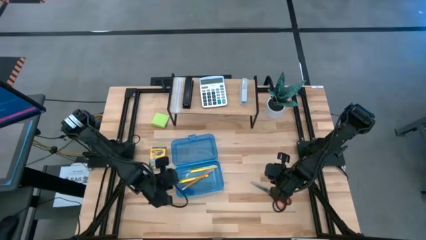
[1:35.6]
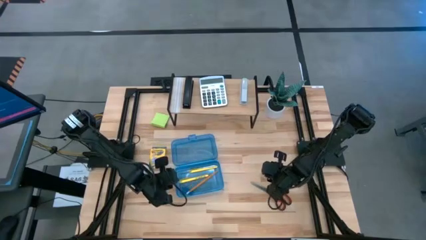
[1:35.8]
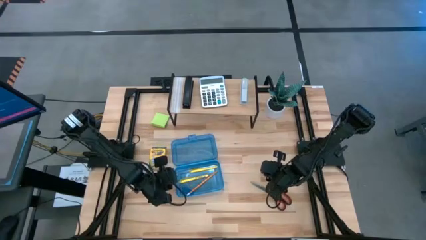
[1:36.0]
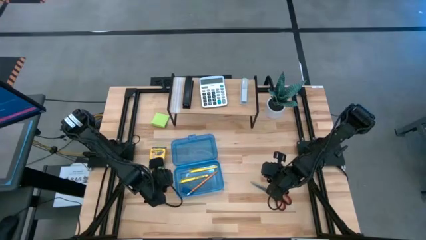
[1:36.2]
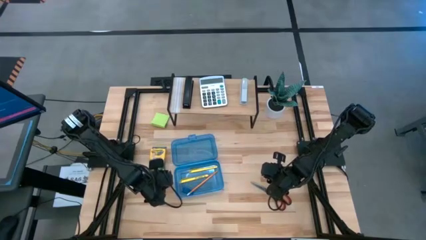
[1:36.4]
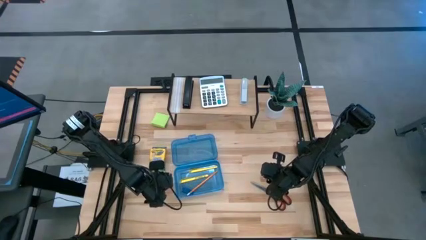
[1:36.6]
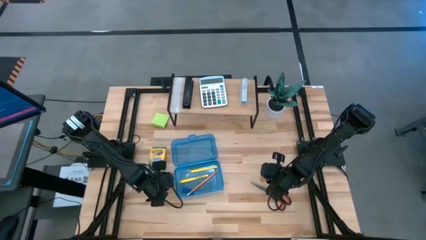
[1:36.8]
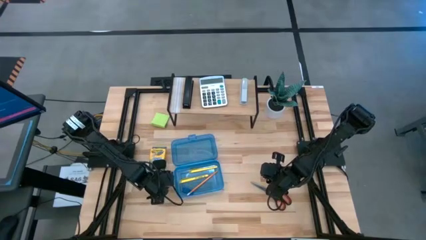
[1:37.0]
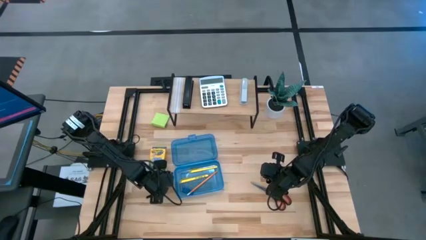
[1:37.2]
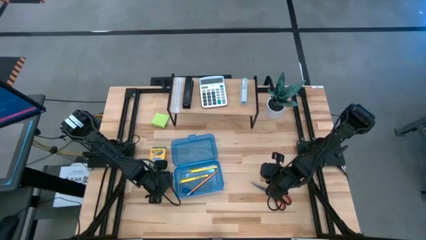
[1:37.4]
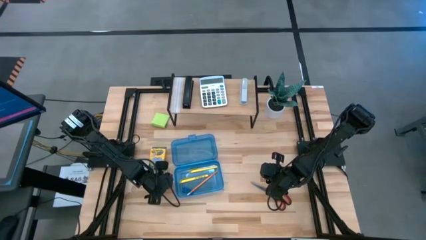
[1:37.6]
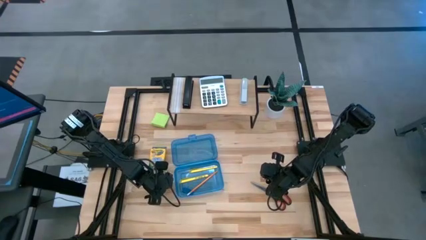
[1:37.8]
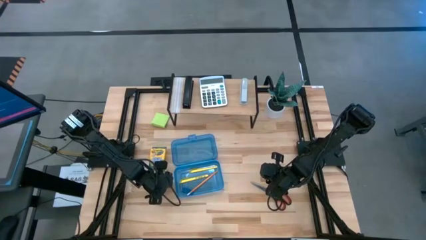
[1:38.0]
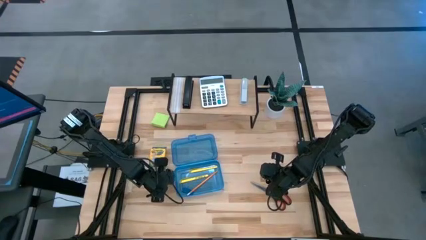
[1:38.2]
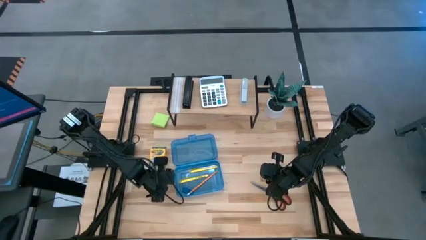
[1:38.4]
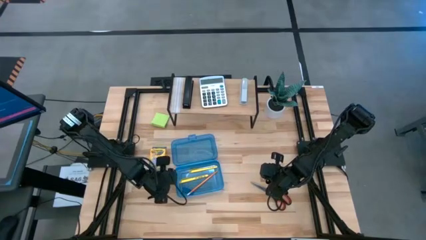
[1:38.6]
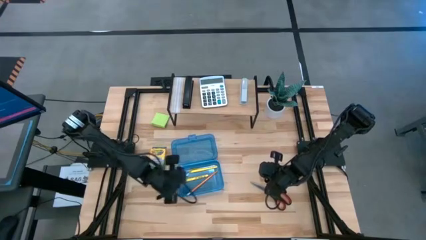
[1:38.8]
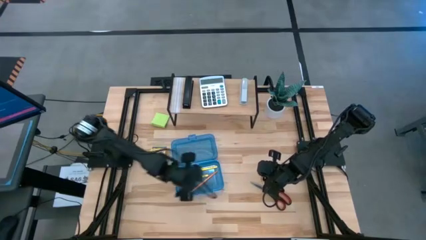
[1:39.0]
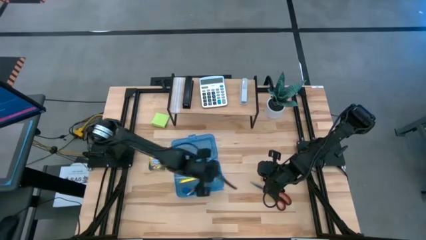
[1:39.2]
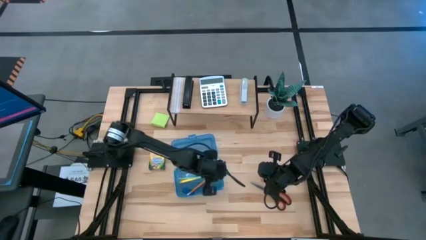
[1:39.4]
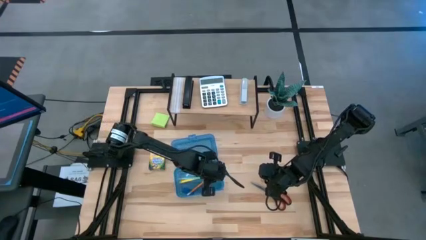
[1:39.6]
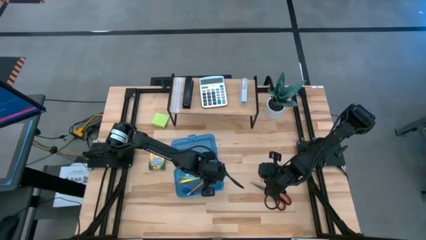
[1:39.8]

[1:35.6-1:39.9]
Task: Pack school essentials
Put the green pencil into the blue supply box

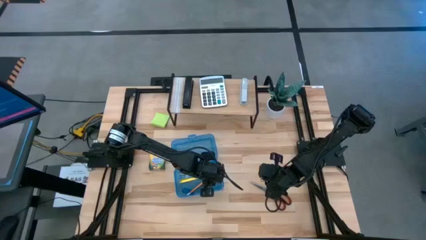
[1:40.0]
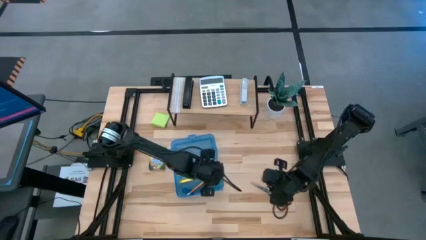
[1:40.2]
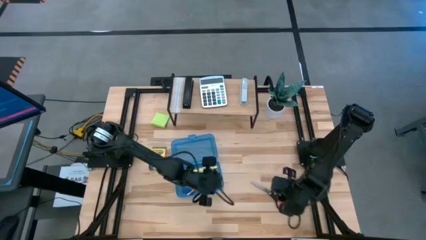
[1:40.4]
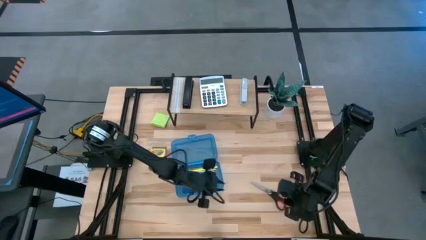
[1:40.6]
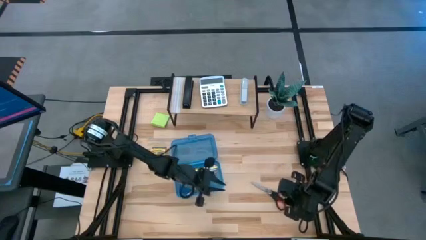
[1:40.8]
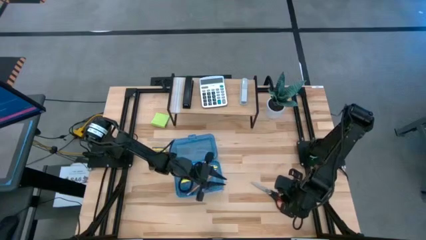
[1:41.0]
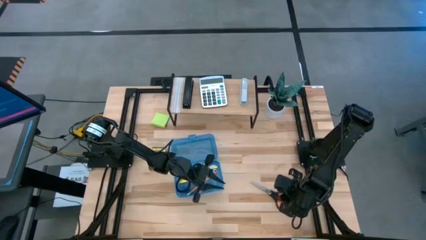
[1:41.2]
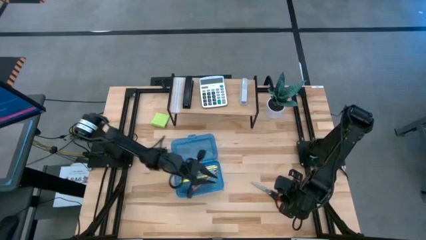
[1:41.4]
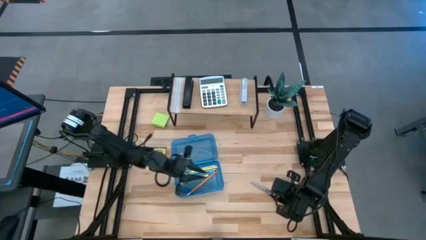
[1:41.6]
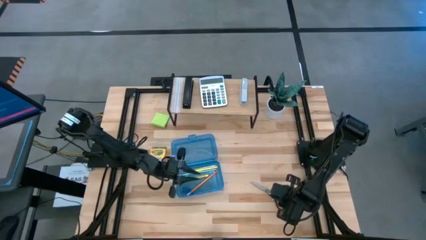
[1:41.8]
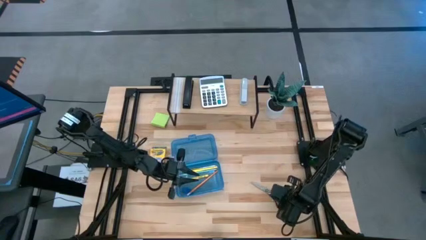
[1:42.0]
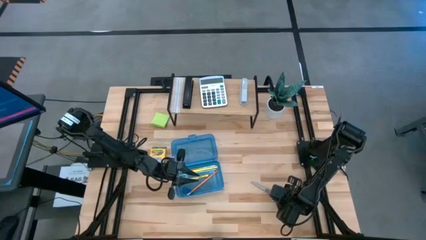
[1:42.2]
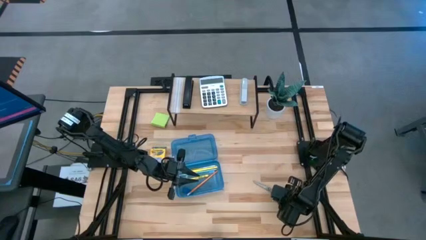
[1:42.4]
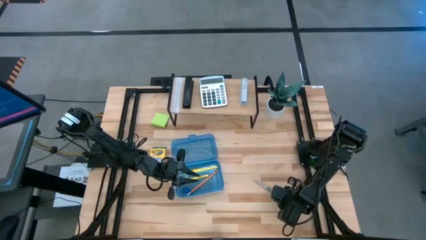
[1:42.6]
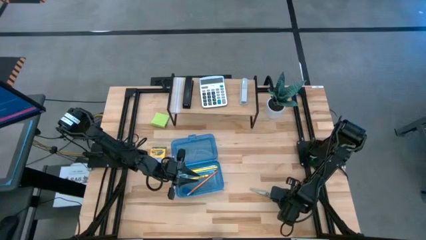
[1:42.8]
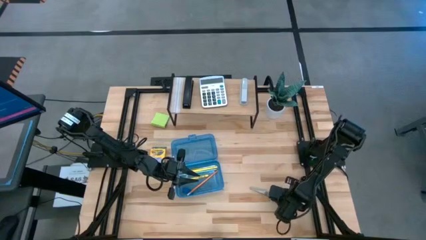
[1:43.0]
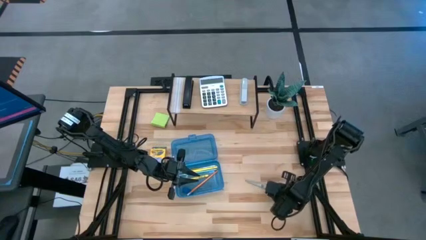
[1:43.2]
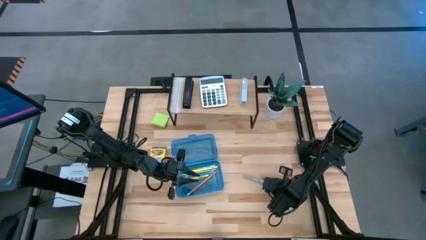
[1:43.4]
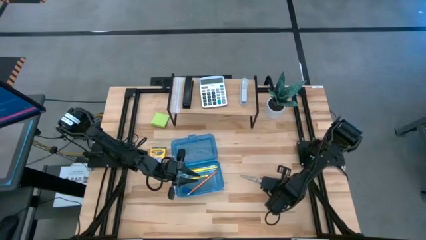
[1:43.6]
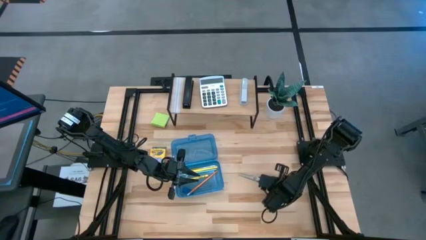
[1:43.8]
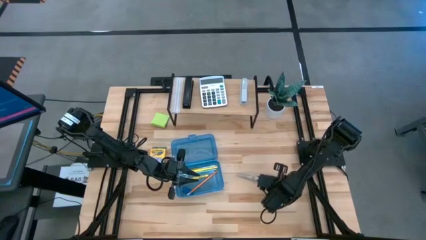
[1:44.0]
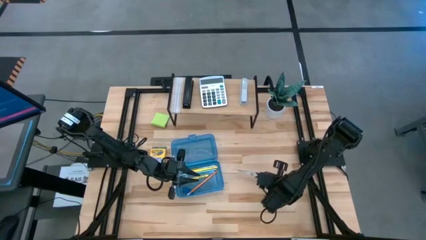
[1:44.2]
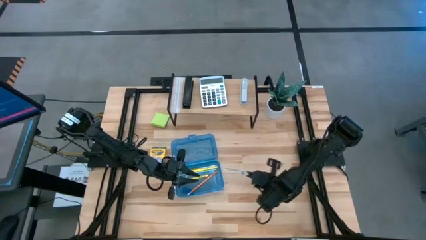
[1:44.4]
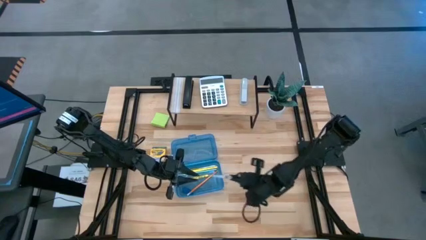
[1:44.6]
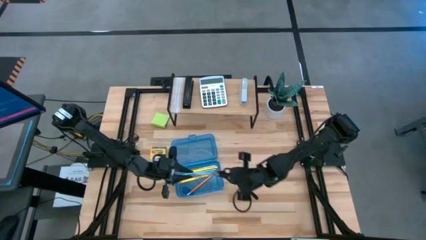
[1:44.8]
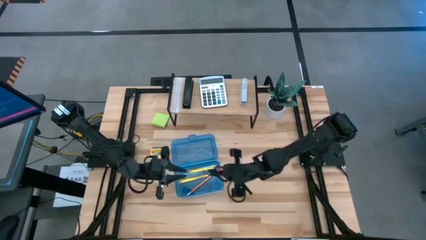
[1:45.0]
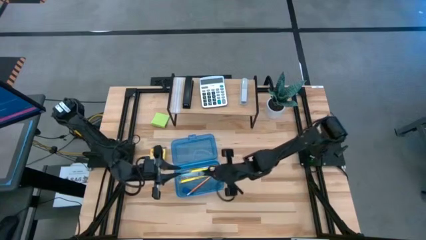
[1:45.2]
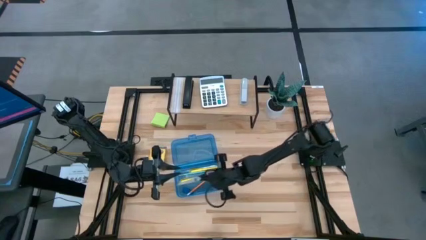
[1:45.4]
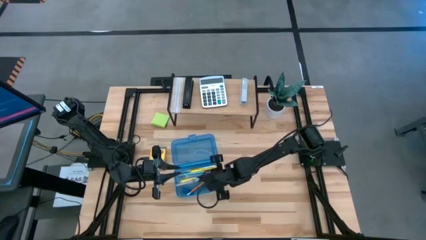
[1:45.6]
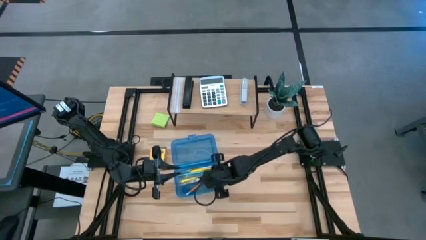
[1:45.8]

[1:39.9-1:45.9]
Put the black scissors into the blue supply box

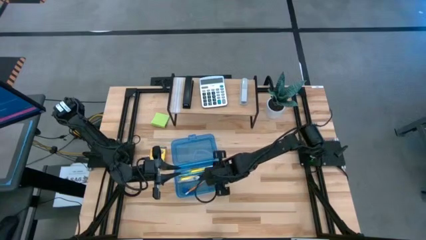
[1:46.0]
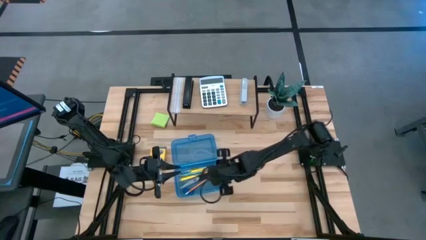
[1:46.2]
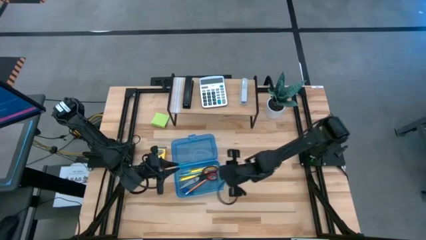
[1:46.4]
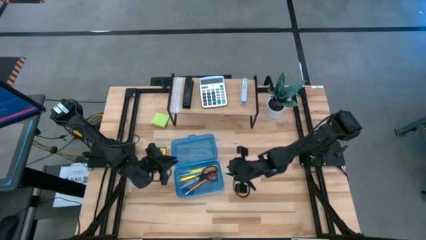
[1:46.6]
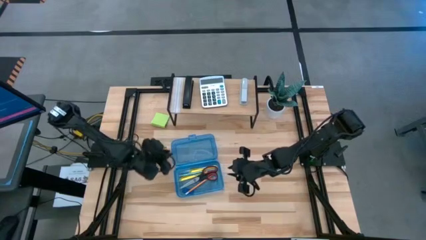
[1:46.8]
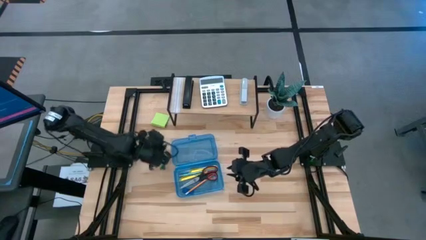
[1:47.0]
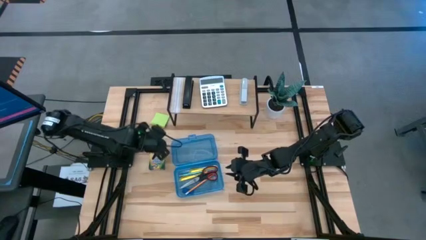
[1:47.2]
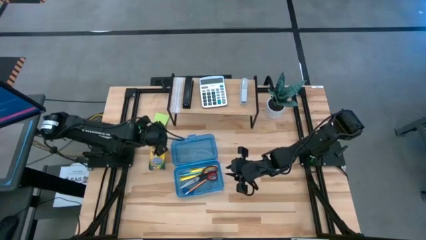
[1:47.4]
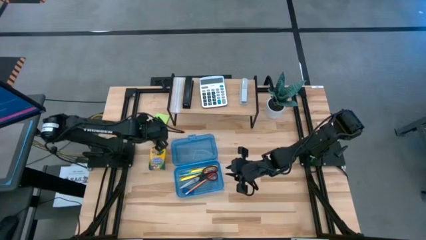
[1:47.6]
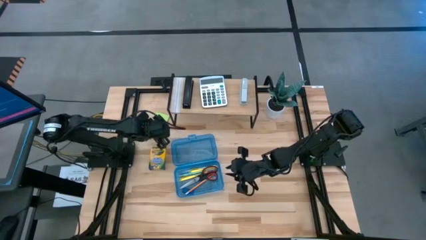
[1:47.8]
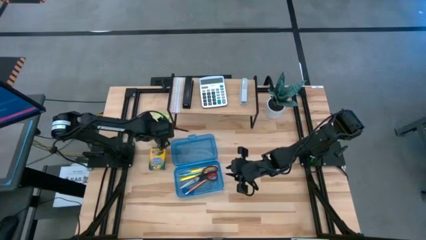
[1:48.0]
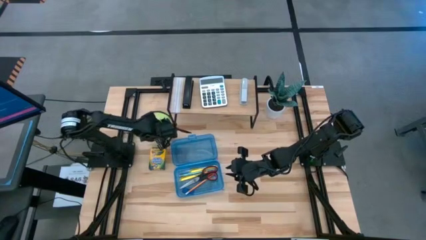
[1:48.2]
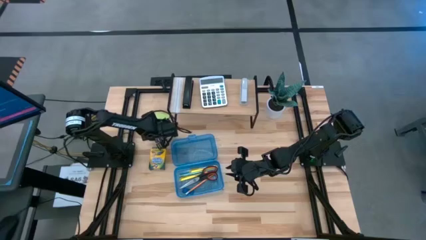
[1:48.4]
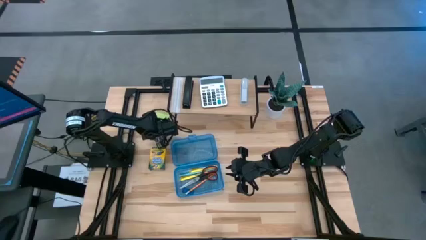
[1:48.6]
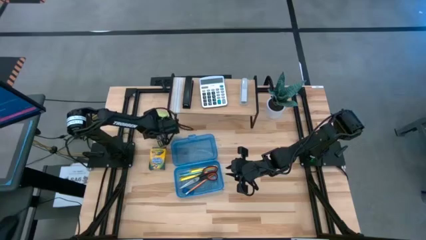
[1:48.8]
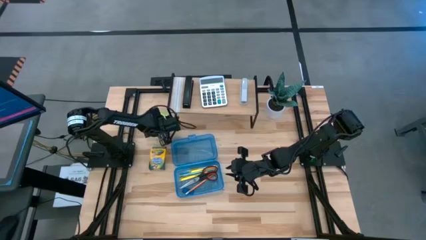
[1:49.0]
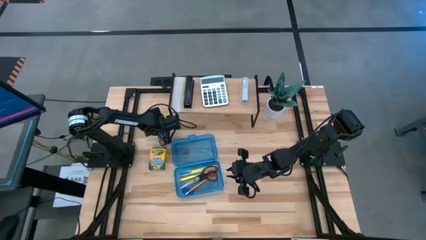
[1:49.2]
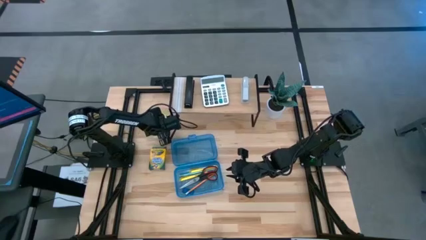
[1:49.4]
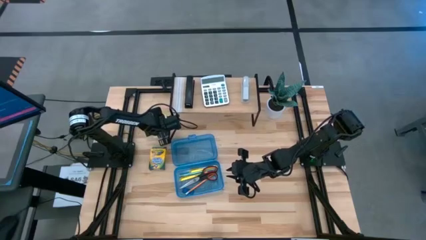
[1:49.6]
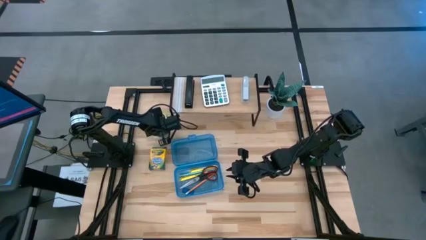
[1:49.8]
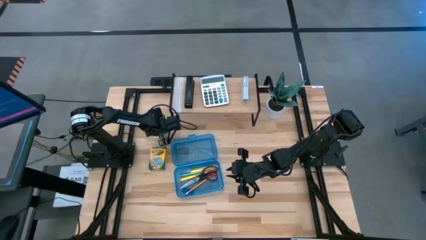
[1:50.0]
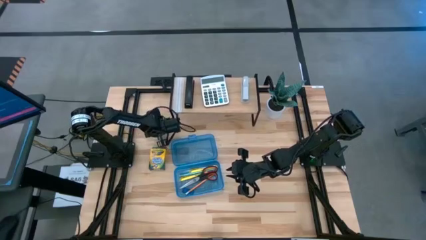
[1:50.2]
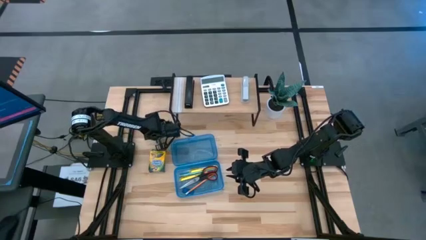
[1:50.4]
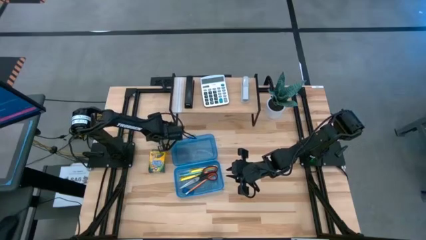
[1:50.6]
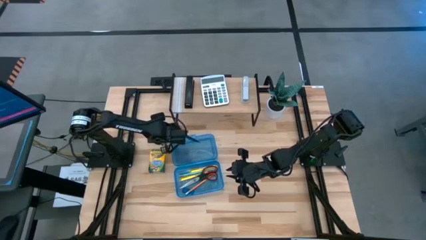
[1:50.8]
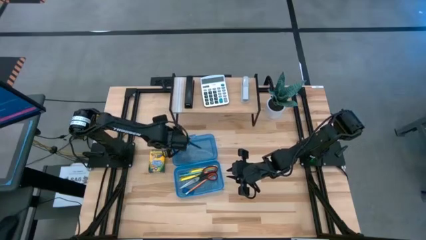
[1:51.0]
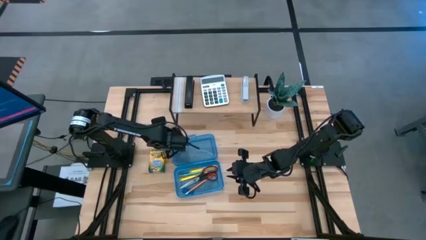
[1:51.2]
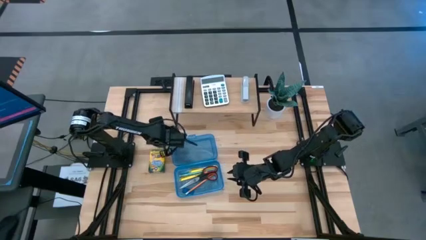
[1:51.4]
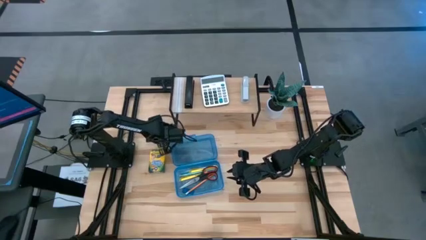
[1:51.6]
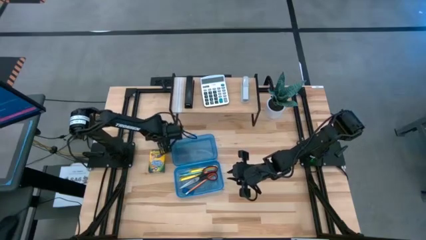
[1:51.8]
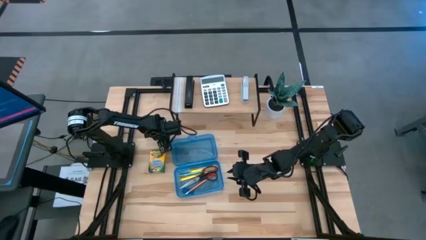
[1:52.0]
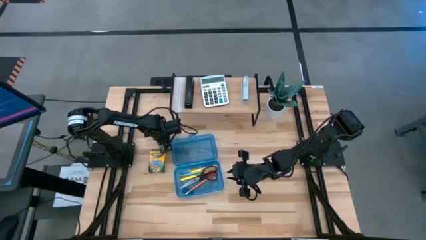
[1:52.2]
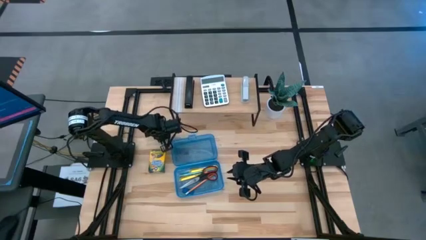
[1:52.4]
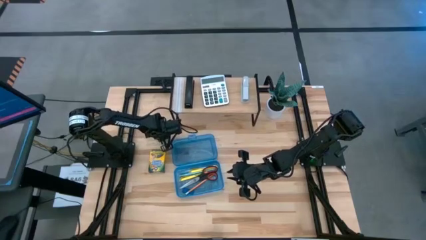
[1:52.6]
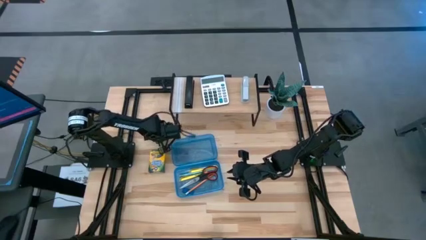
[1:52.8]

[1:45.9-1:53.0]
Put the green sticky note into the blue supply box
